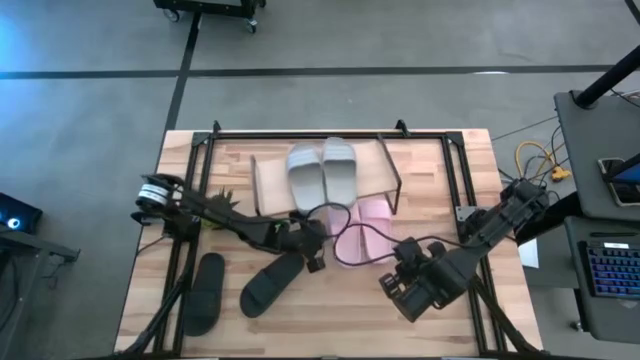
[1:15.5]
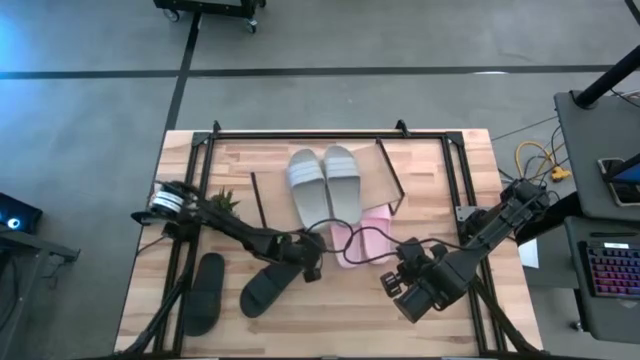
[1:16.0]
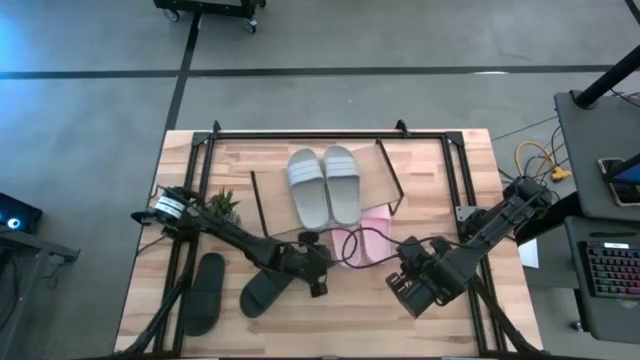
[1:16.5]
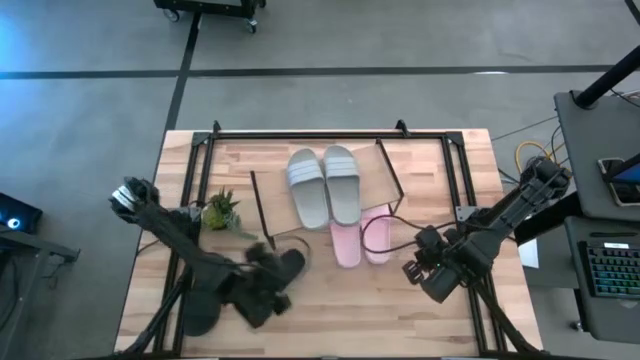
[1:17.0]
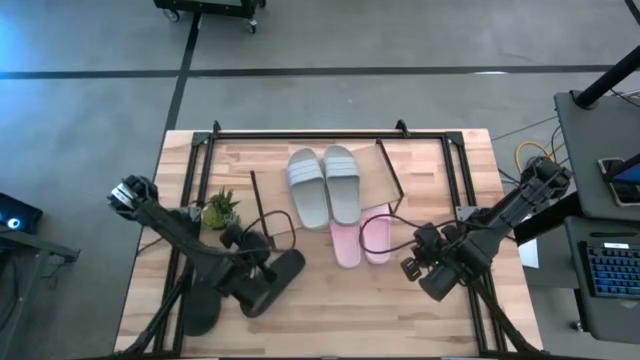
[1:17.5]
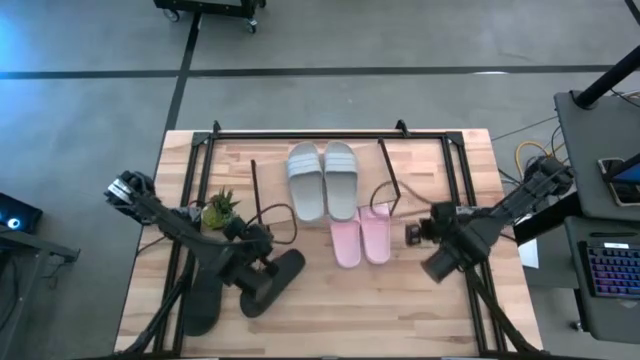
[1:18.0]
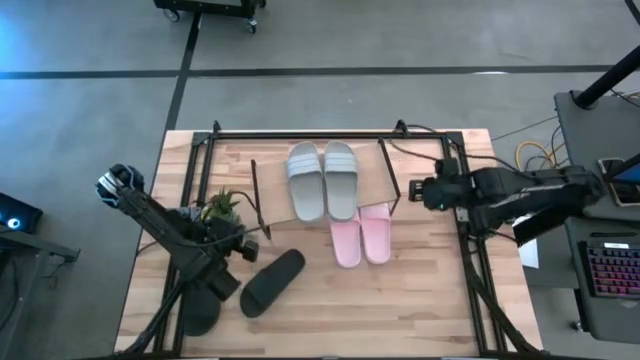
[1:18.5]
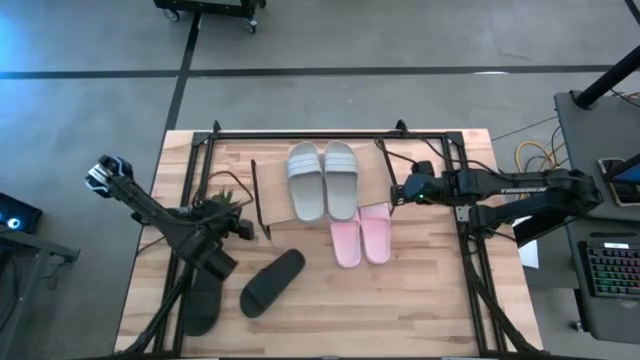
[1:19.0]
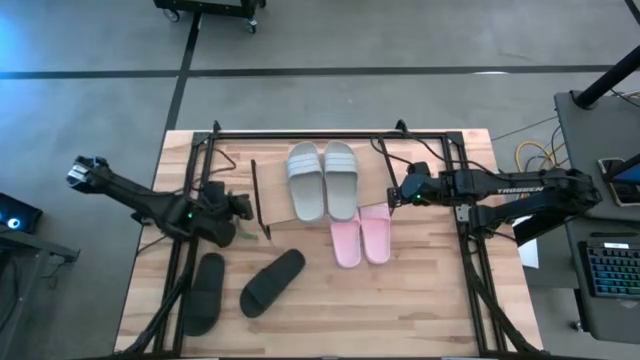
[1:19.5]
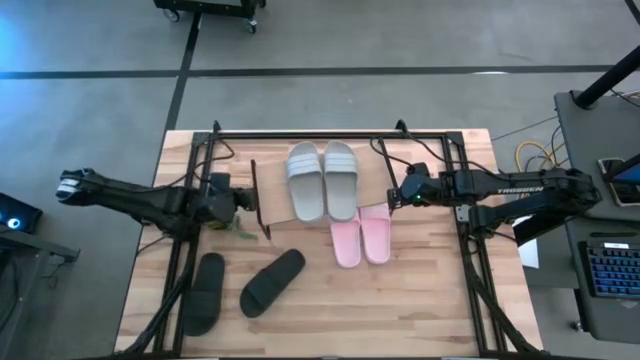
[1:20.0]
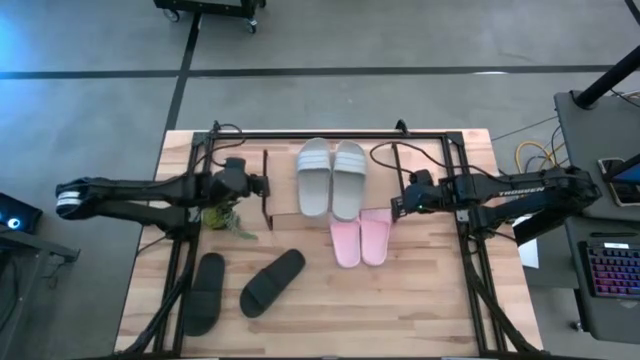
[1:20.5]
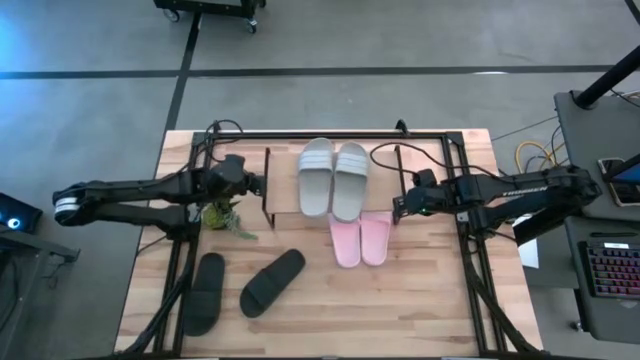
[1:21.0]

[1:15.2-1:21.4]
Task: Pick and place slides into the shelf
Adjust the shelf

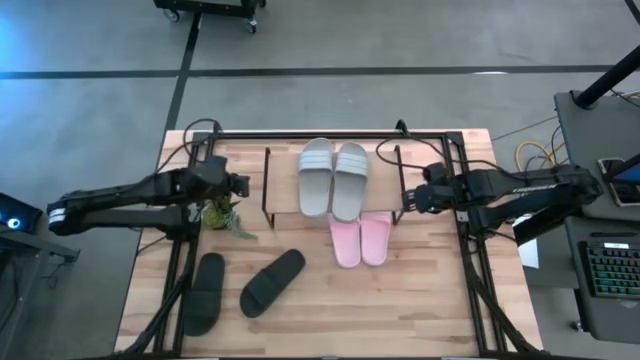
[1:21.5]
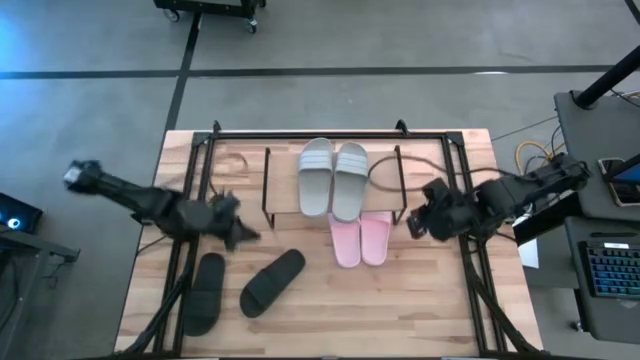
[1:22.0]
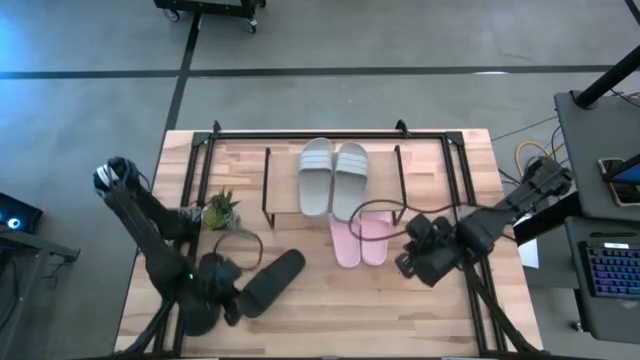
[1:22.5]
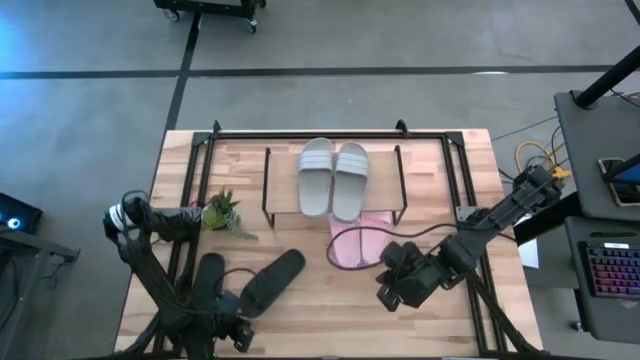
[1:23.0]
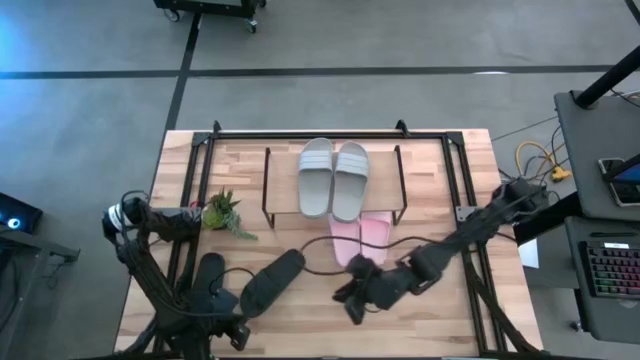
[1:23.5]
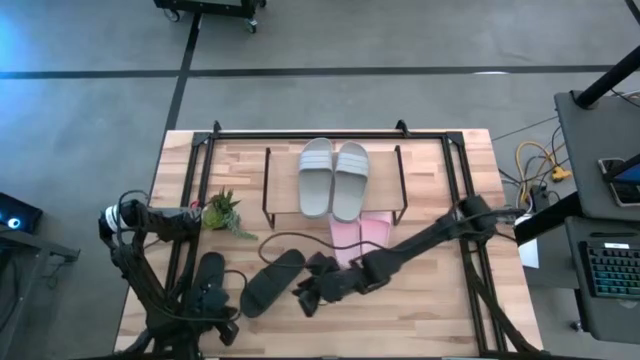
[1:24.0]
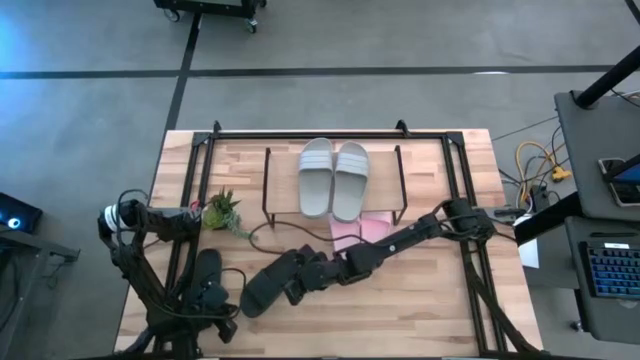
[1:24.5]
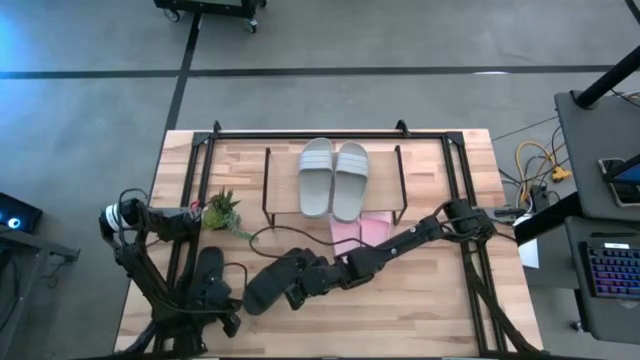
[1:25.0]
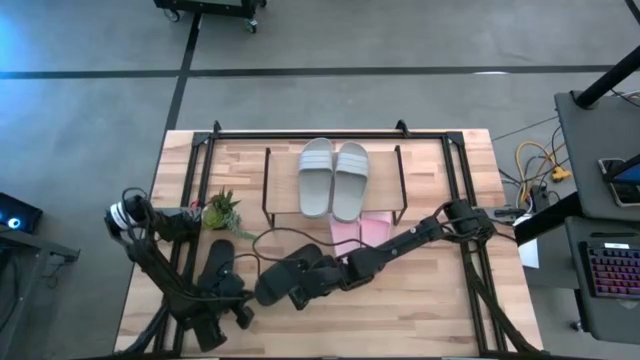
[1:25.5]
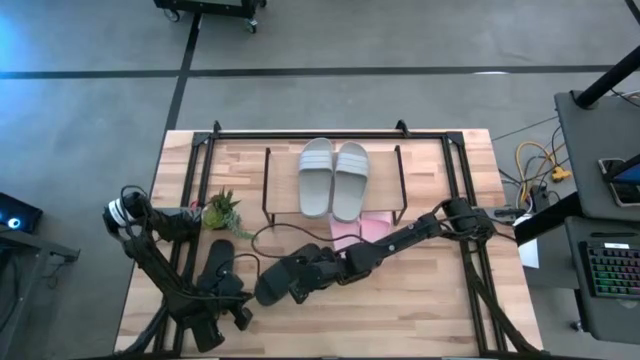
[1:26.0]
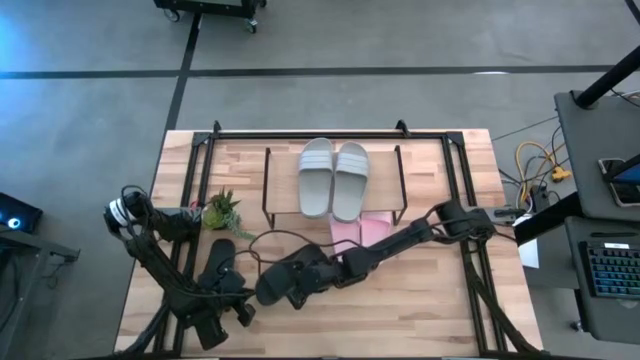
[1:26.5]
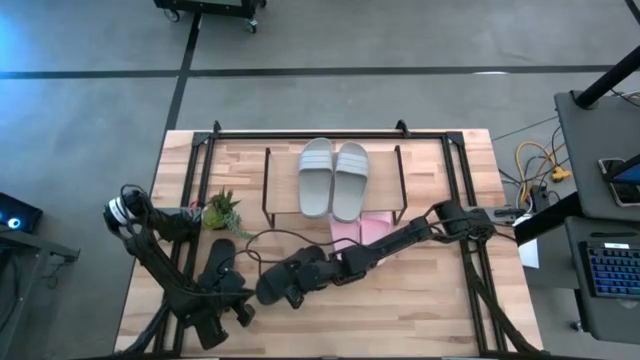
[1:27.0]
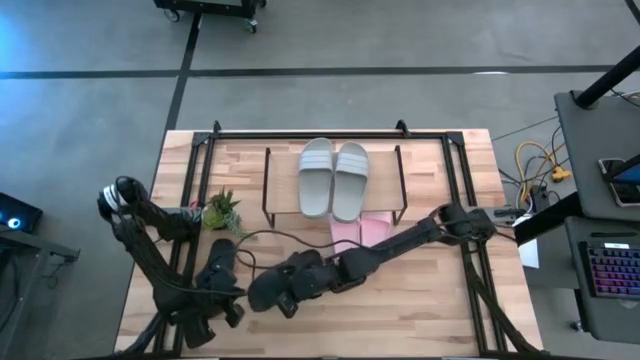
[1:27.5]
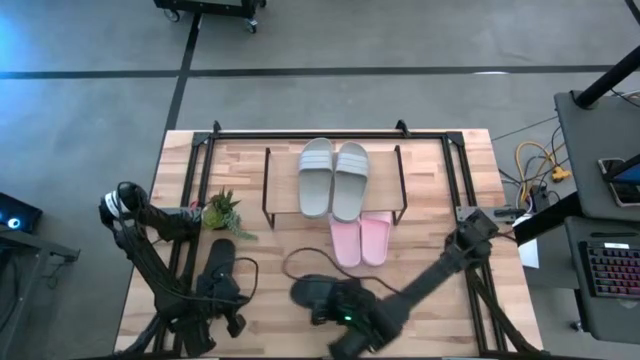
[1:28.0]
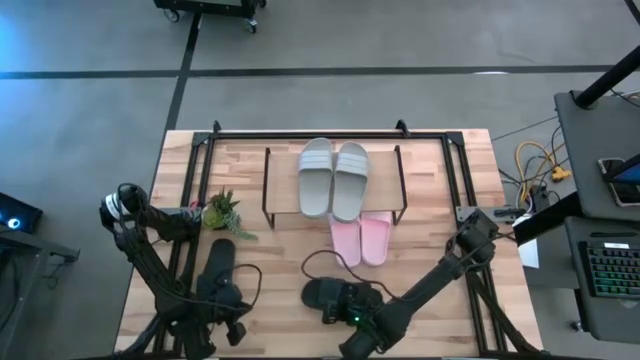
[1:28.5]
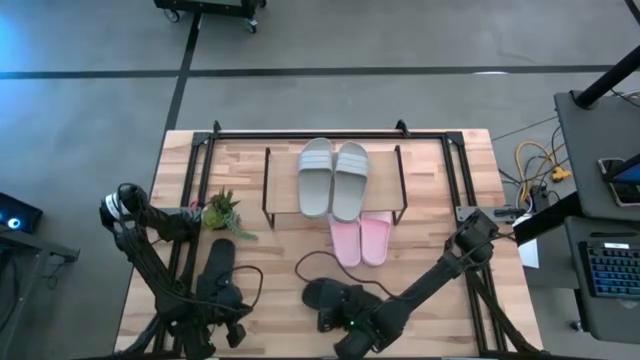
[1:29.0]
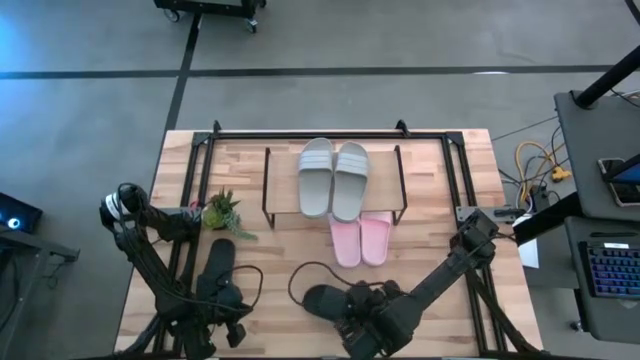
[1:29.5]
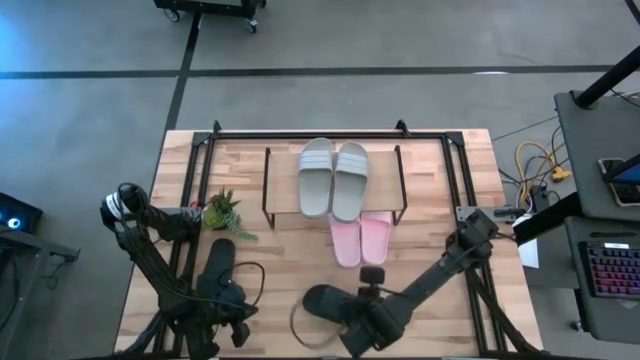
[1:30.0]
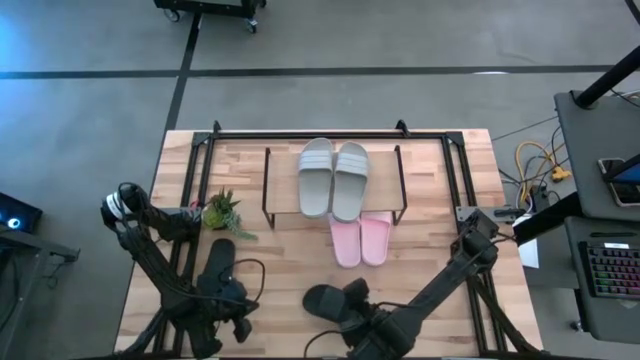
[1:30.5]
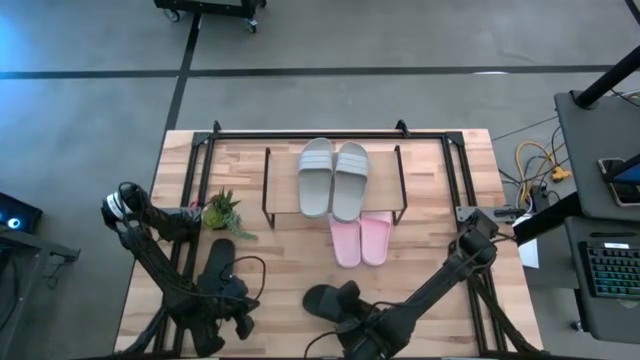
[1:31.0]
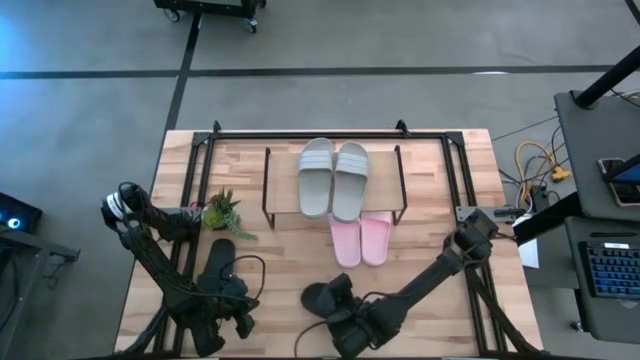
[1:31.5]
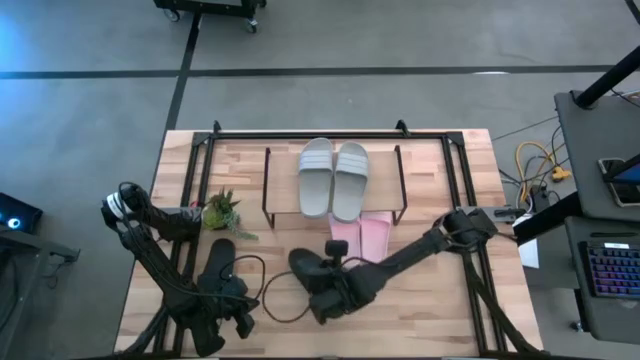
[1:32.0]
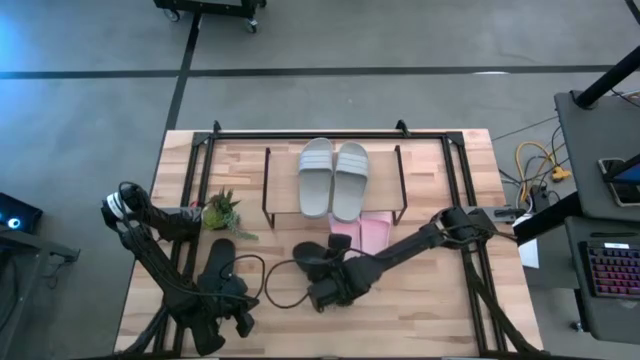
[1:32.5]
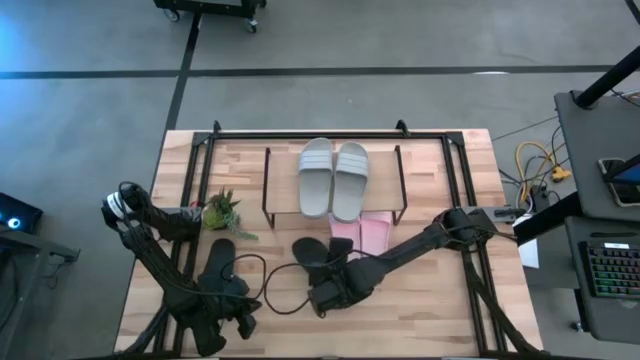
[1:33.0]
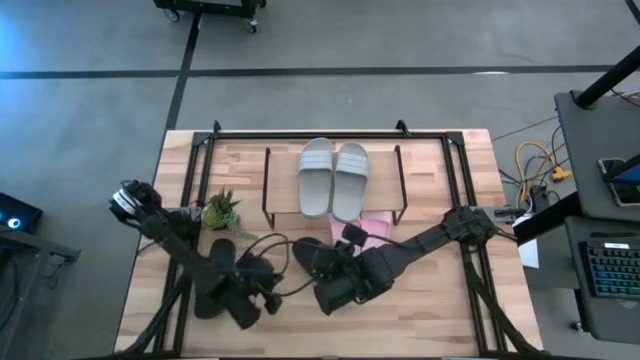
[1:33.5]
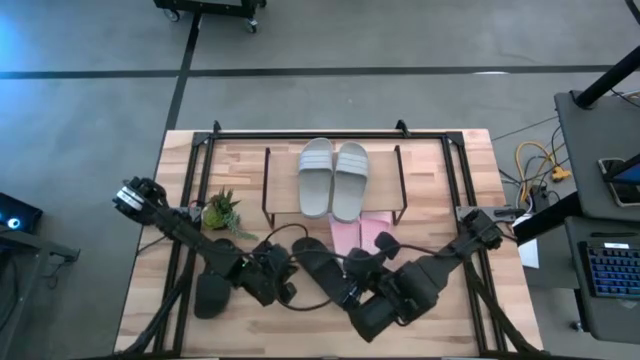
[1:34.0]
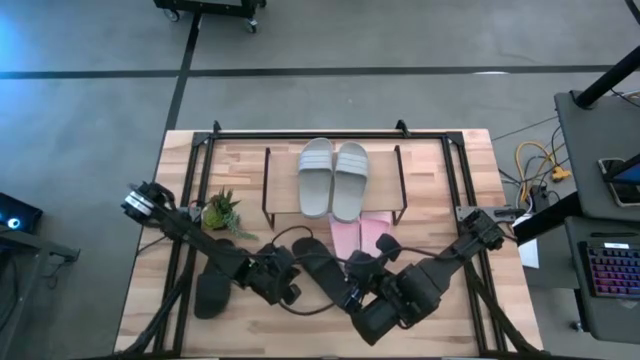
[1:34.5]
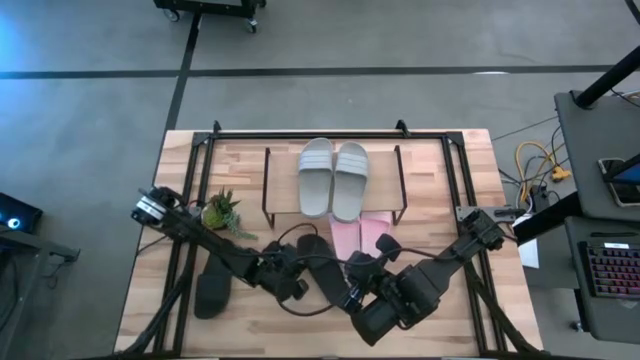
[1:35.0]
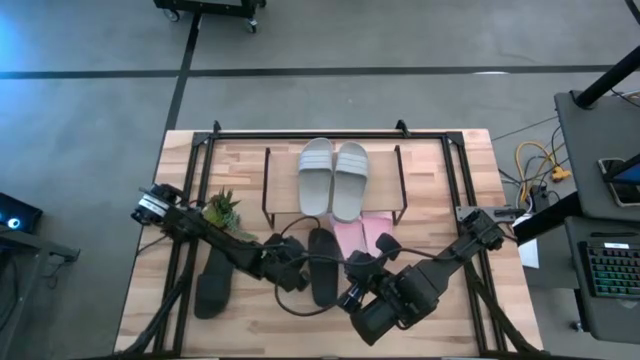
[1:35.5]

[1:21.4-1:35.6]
Move the black slide to the center of the table
